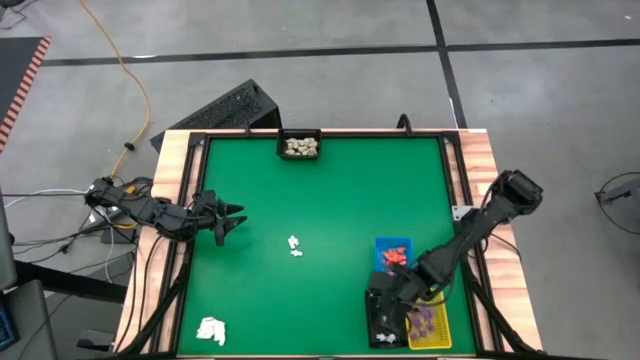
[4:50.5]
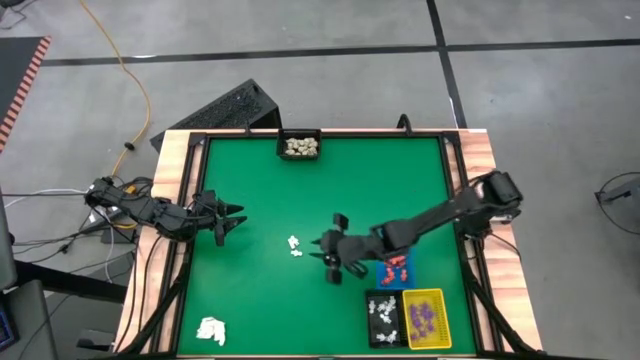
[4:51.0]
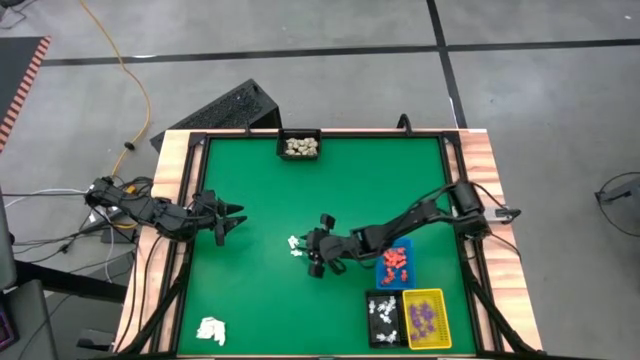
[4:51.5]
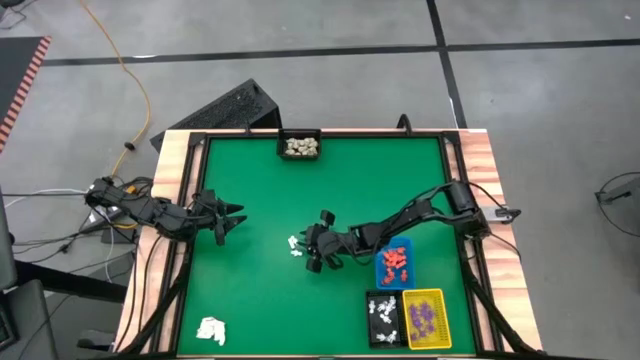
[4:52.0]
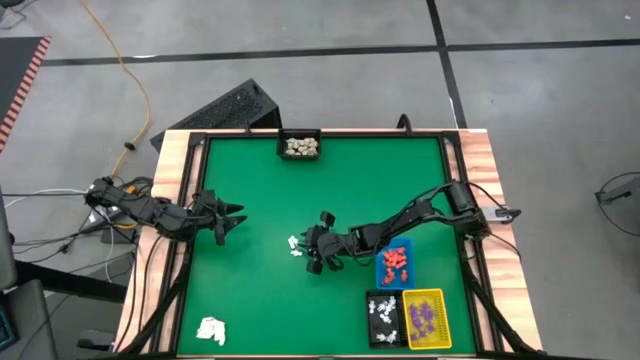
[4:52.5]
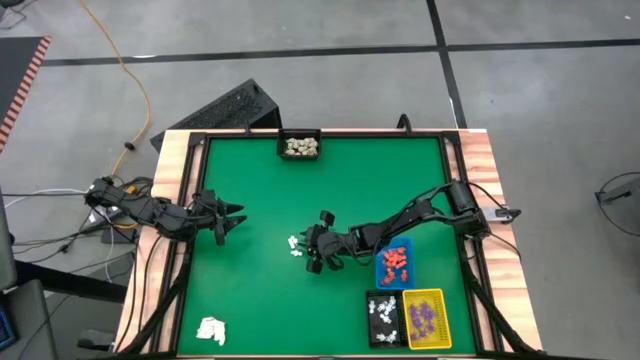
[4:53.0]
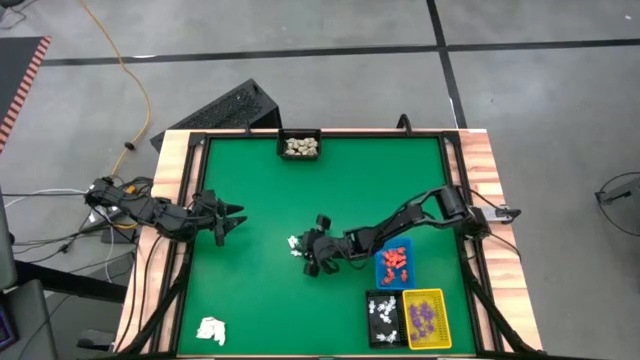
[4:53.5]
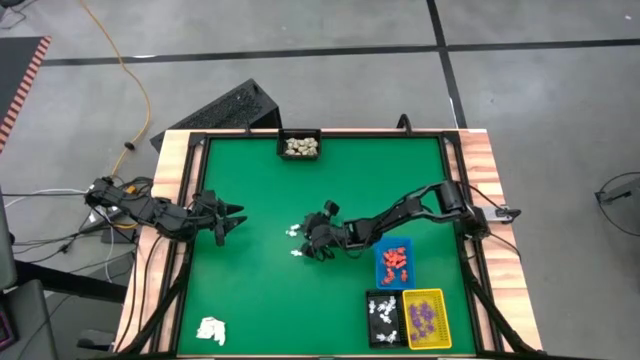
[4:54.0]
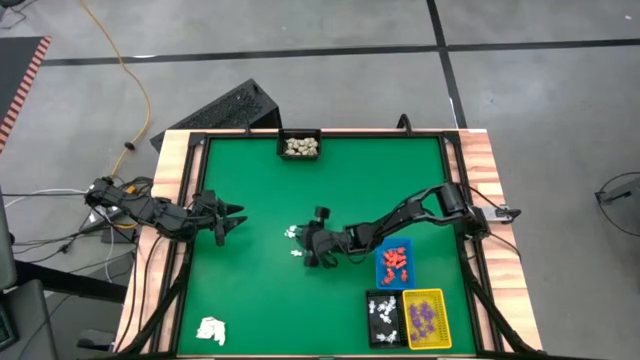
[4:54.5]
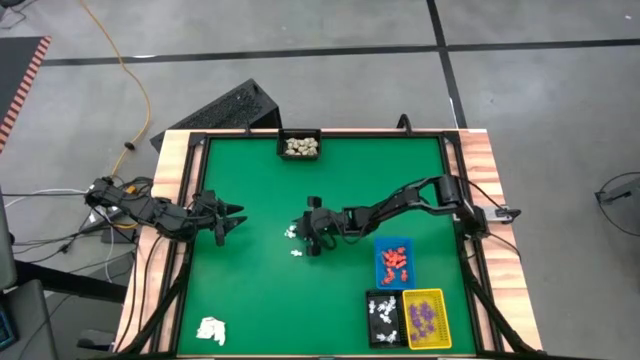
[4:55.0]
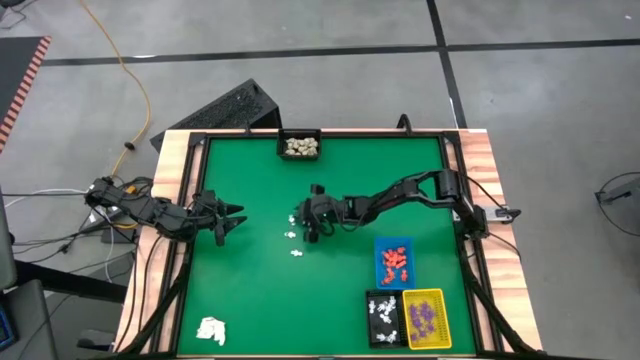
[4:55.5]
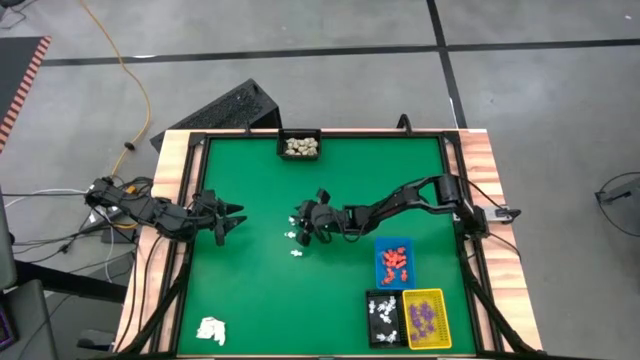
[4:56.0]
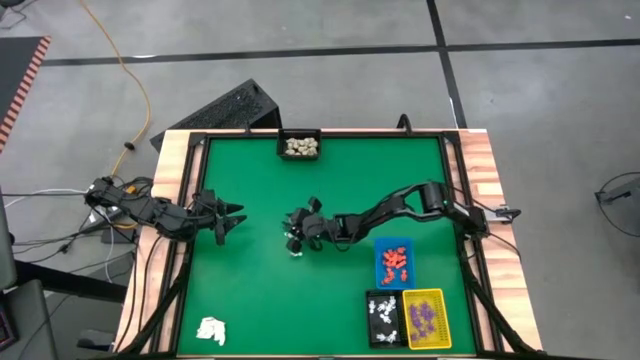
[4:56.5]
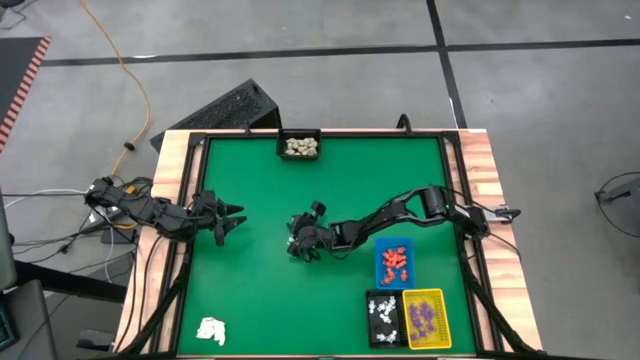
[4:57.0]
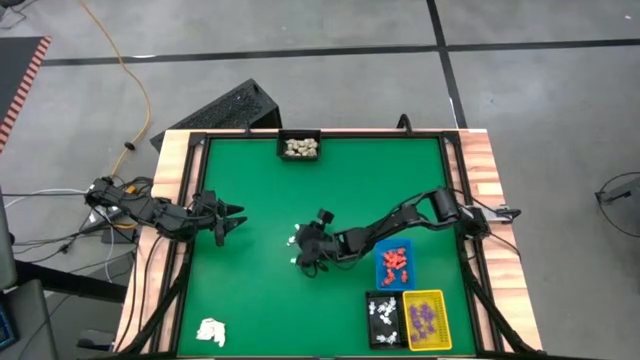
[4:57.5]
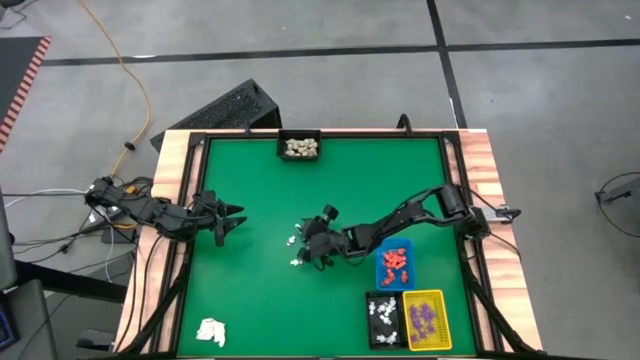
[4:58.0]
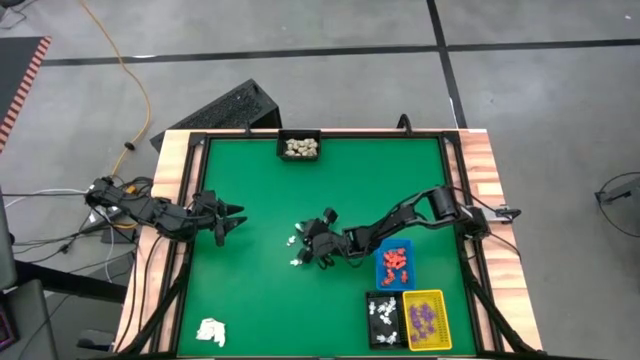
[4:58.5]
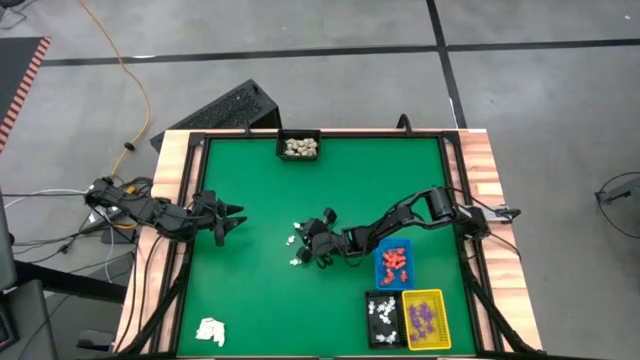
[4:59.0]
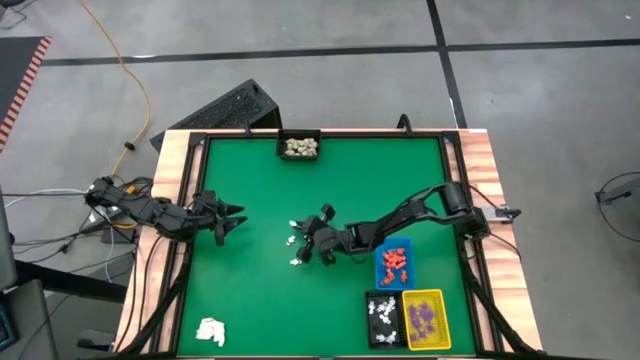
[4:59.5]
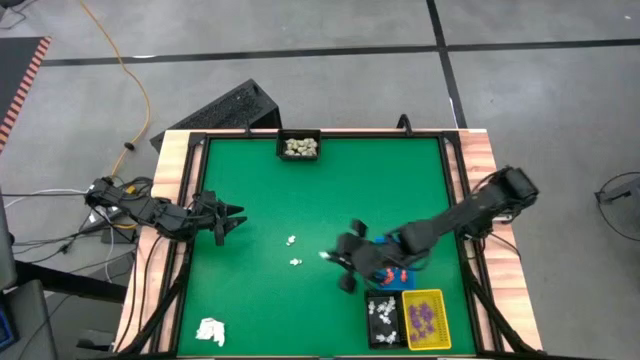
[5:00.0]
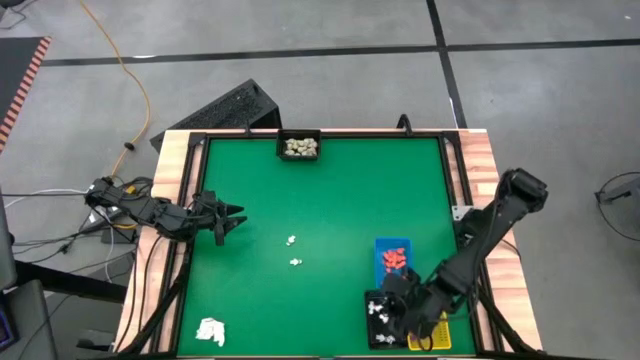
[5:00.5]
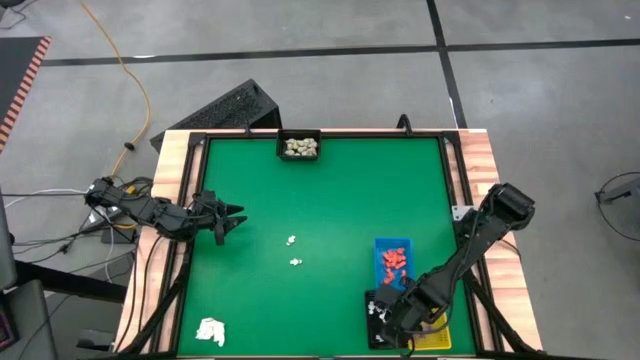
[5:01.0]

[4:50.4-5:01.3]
Task: Sort Halloween decoration
Put the white skeleton toy into the bottom black bin

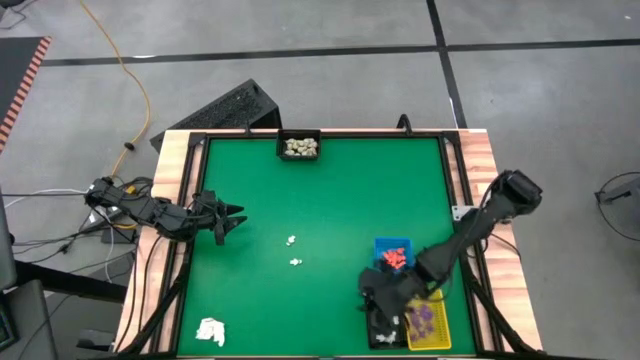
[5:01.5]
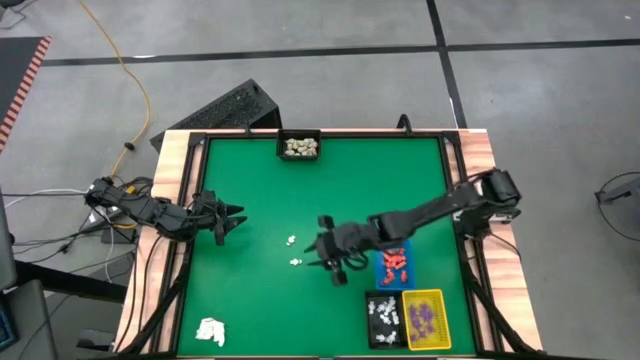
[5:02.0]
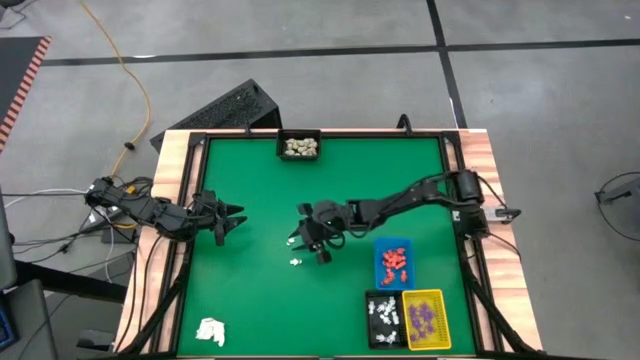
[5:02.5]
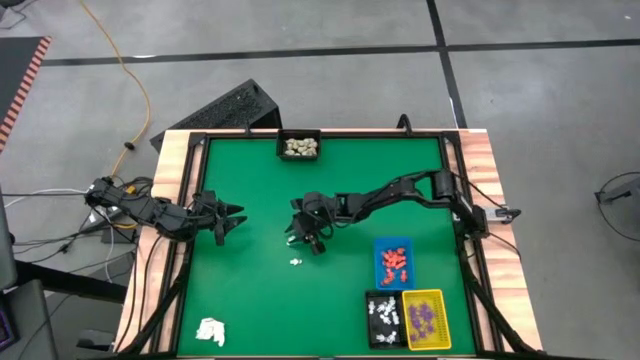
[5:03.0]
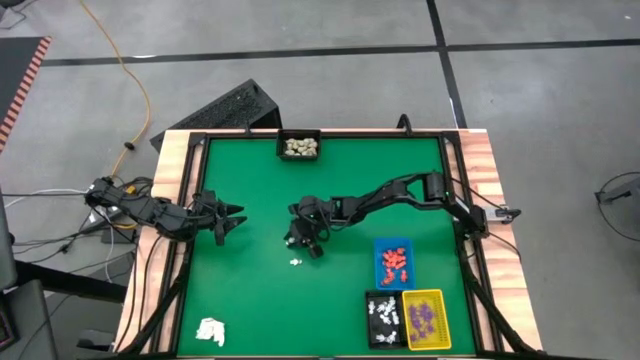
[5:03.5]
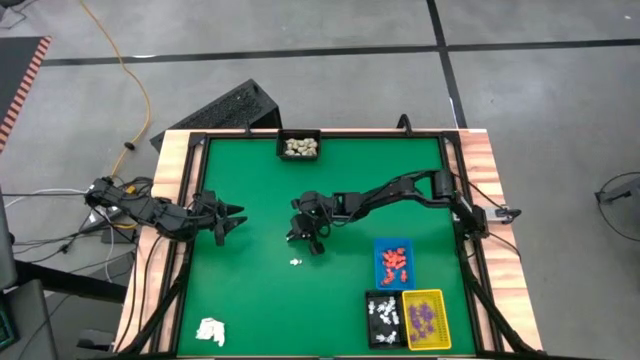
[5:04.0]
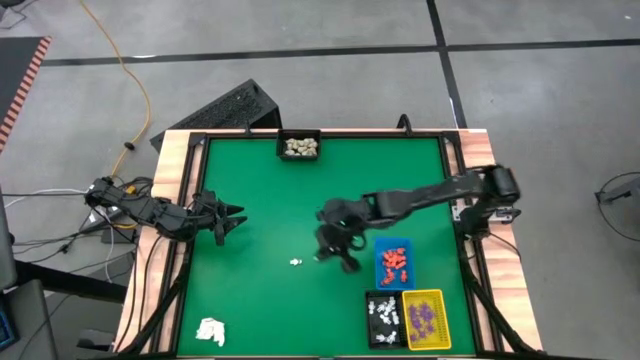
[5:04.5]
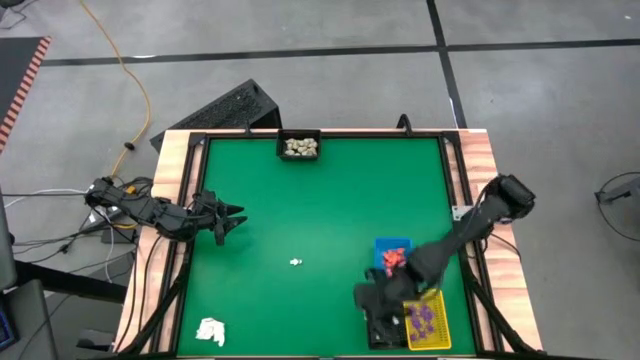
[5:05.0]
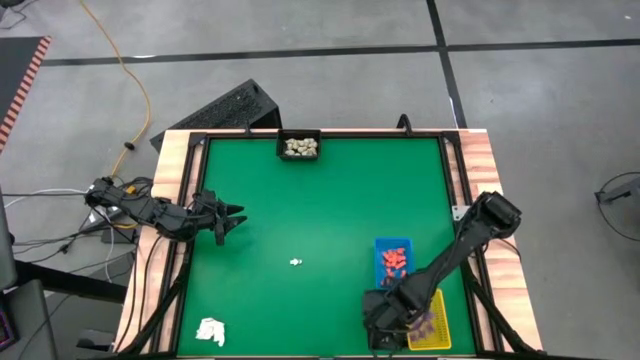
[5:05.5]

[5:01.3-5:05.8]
Put the white skeleton toy into the bottom black bin

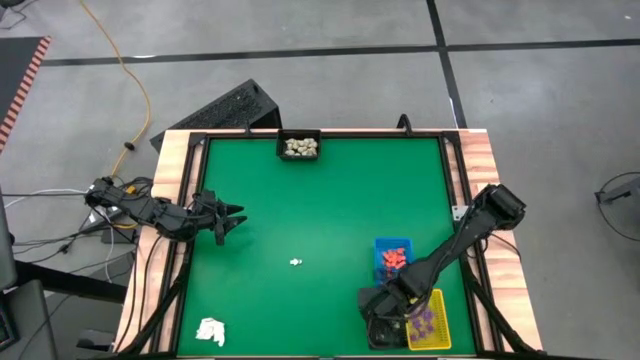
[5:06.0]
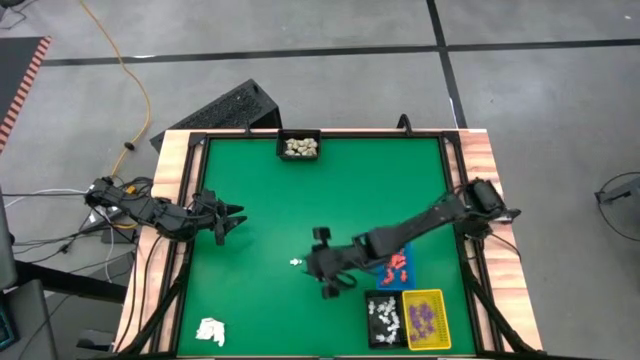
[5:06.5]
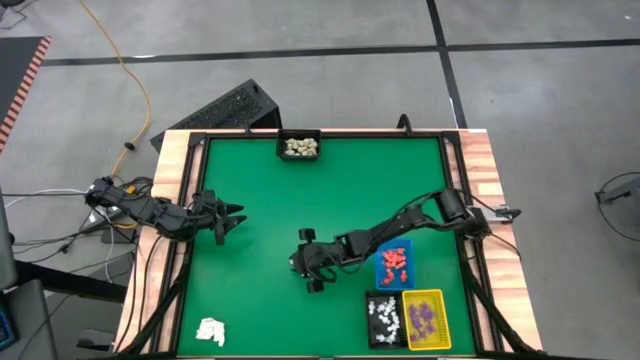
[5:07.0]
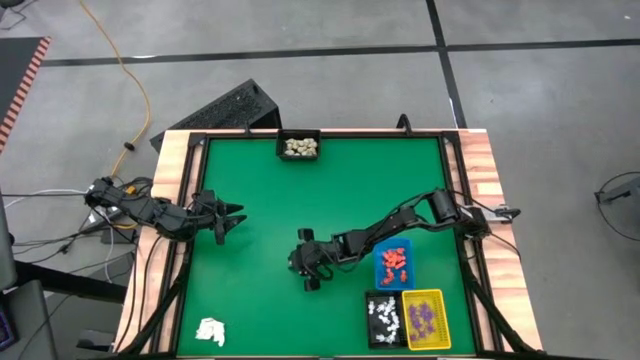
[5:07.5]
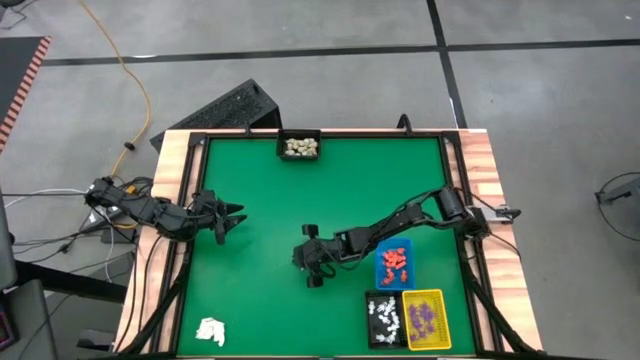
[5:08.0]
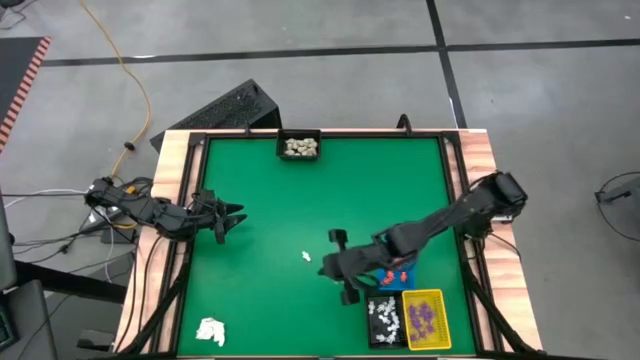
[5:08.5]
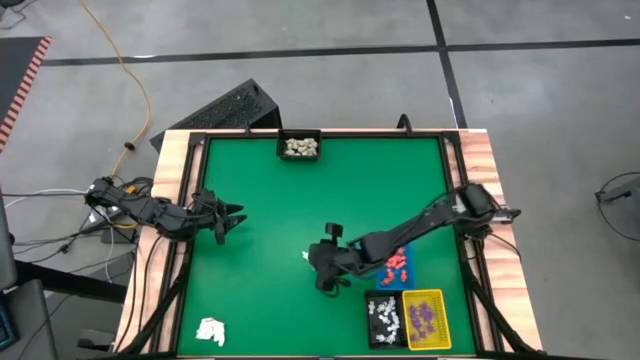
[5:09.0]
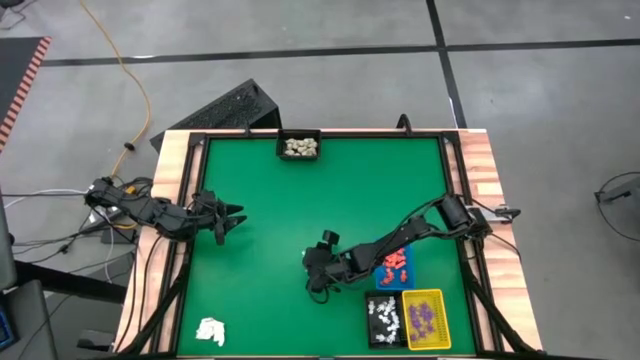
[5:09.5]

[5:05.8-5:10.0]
Put the white skeleton toy into the bottom black bin

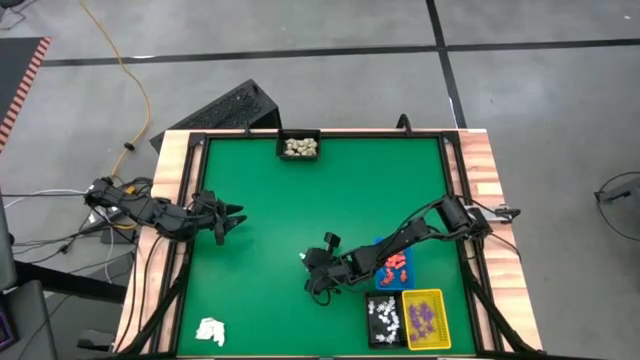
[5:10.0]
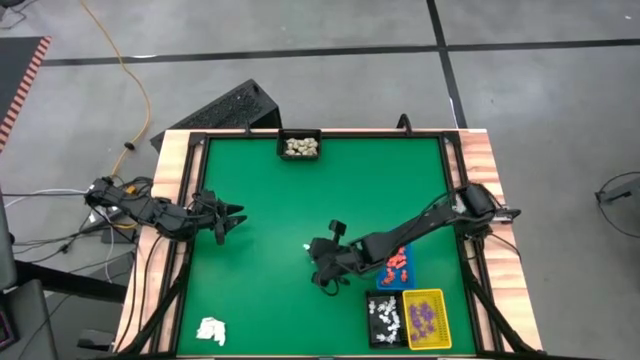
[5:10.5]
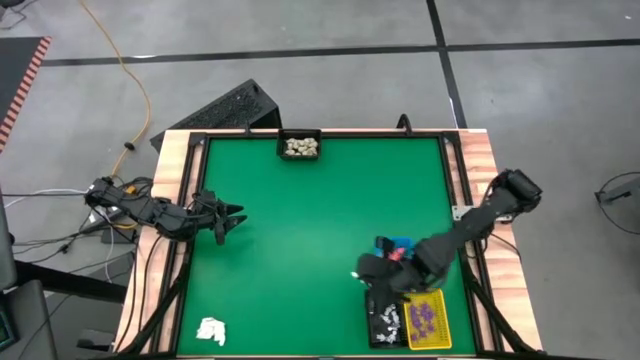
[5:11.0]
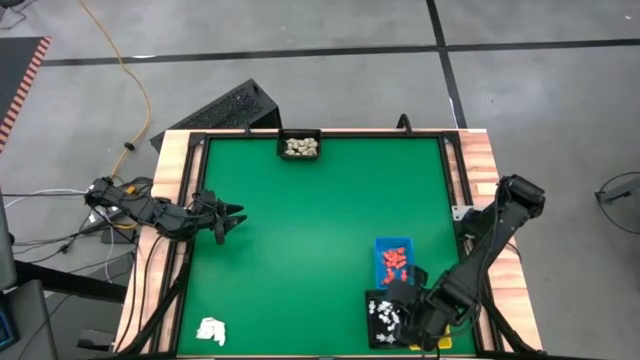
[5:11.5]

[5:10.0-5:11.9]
Put the white skeleton toy into the bottom black bin
